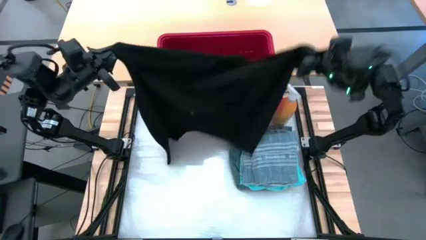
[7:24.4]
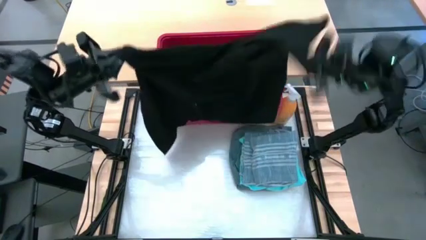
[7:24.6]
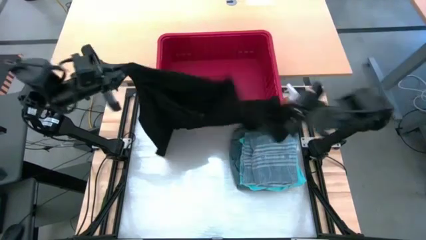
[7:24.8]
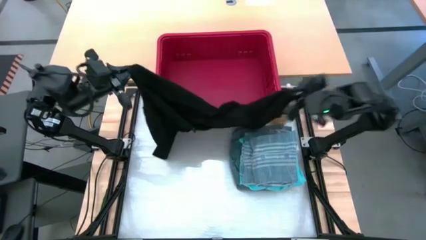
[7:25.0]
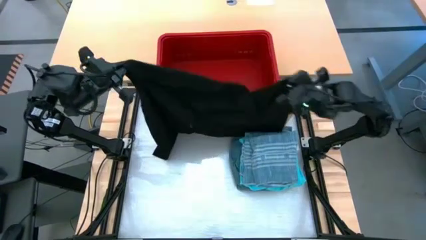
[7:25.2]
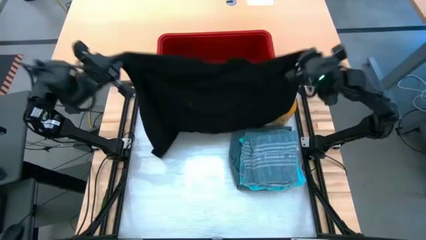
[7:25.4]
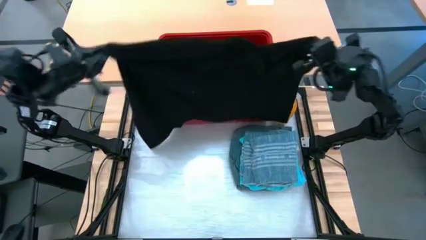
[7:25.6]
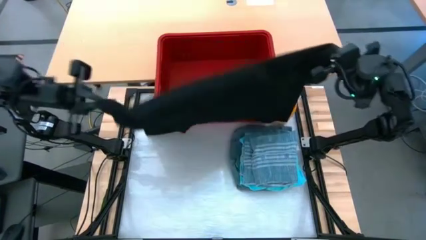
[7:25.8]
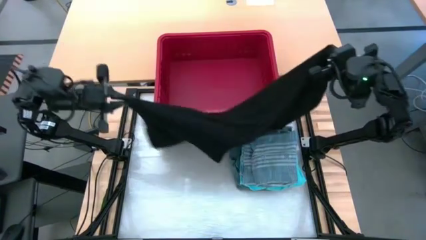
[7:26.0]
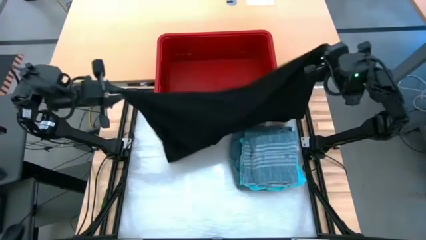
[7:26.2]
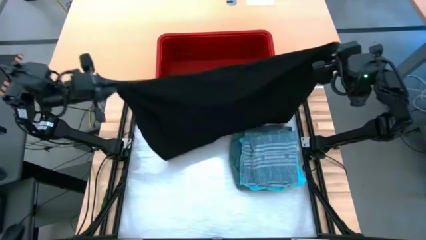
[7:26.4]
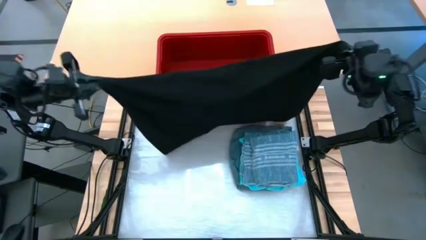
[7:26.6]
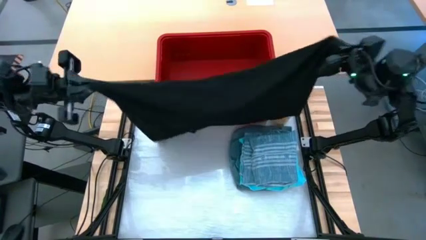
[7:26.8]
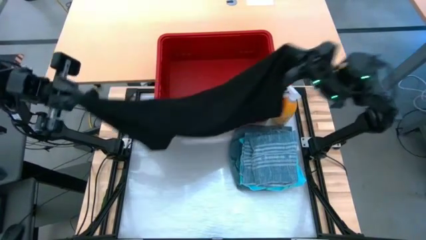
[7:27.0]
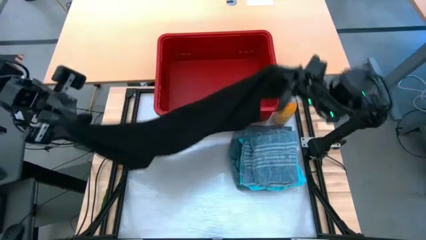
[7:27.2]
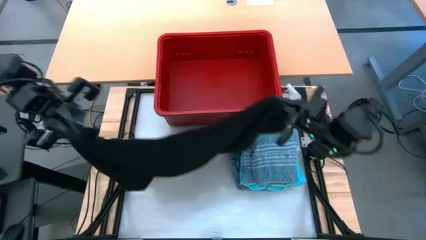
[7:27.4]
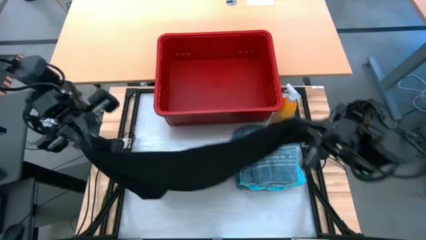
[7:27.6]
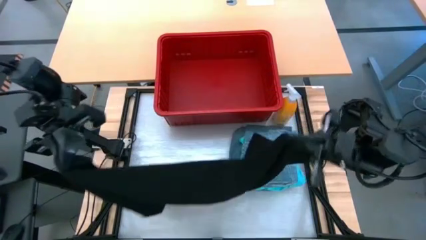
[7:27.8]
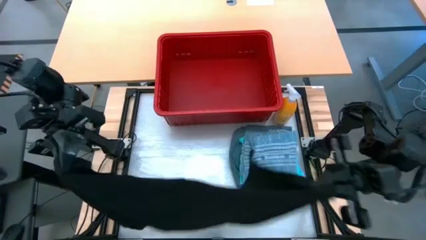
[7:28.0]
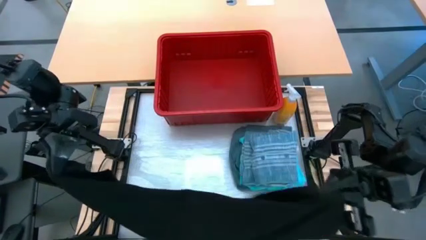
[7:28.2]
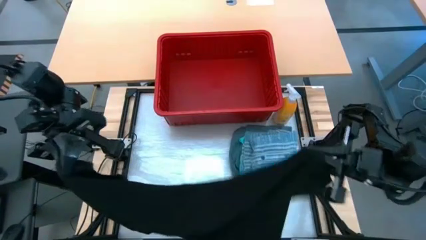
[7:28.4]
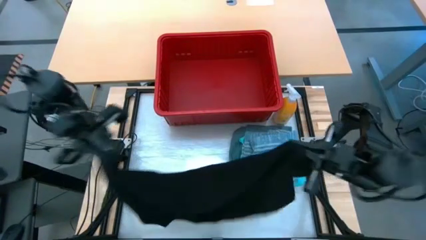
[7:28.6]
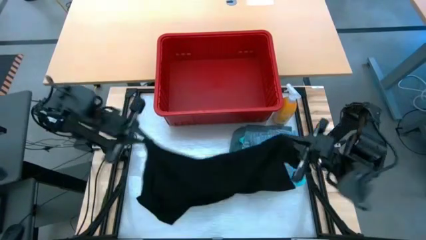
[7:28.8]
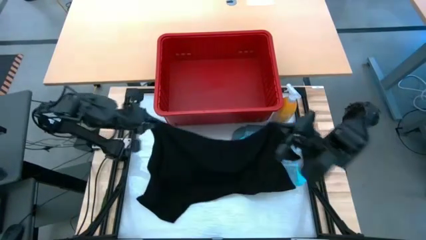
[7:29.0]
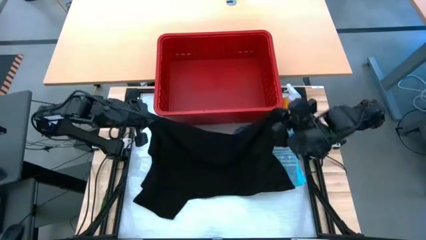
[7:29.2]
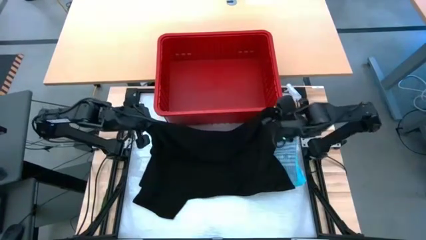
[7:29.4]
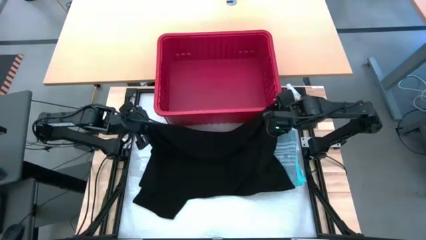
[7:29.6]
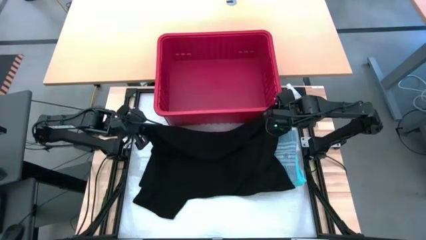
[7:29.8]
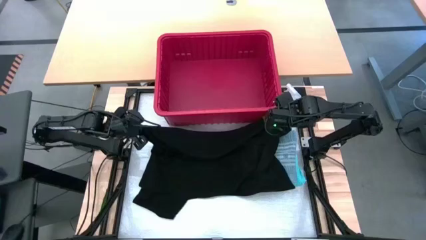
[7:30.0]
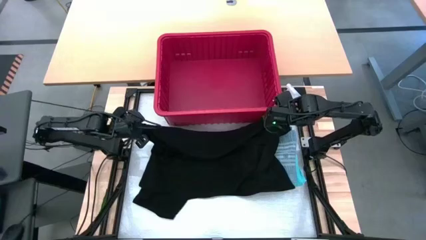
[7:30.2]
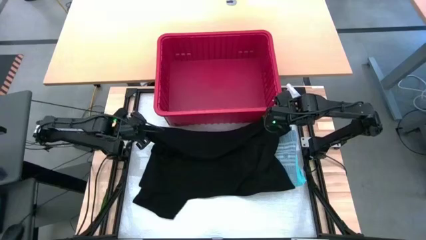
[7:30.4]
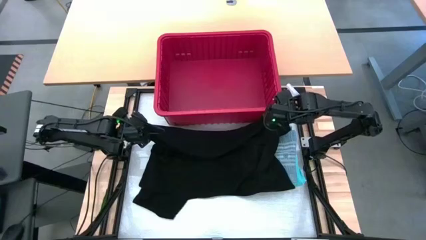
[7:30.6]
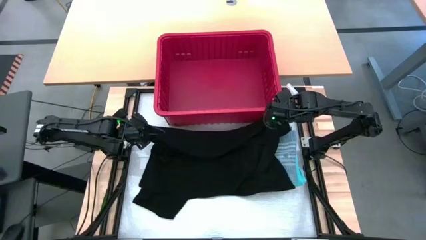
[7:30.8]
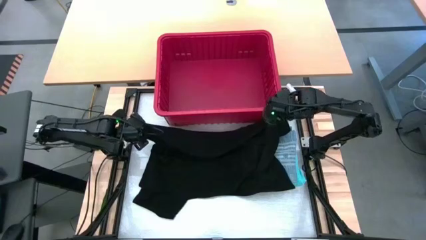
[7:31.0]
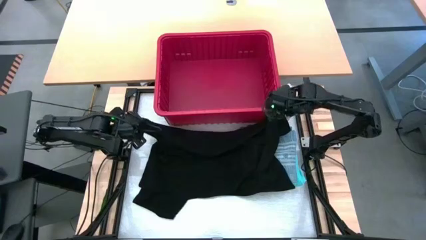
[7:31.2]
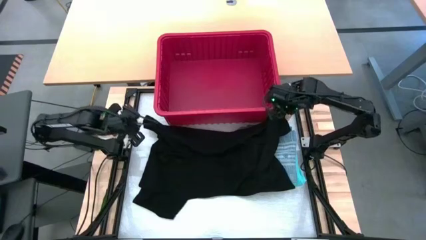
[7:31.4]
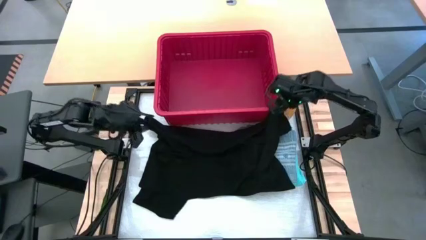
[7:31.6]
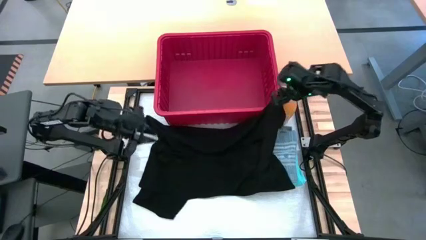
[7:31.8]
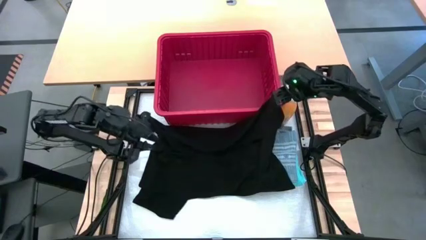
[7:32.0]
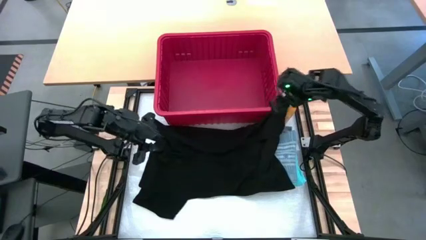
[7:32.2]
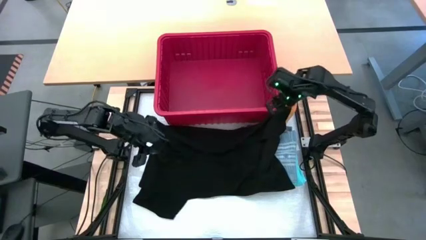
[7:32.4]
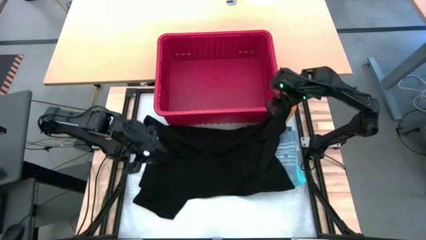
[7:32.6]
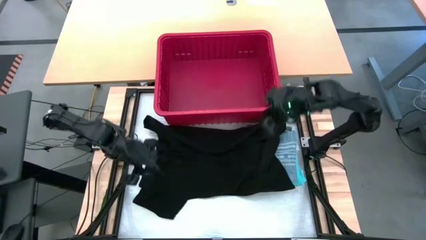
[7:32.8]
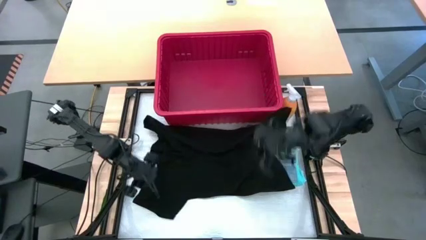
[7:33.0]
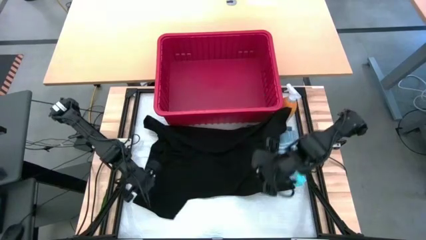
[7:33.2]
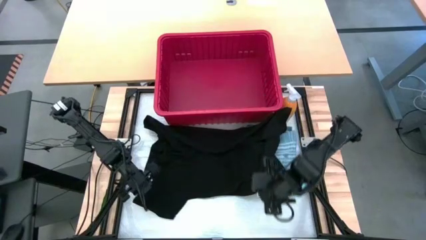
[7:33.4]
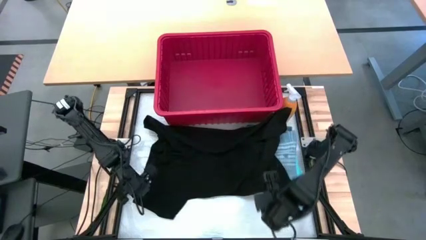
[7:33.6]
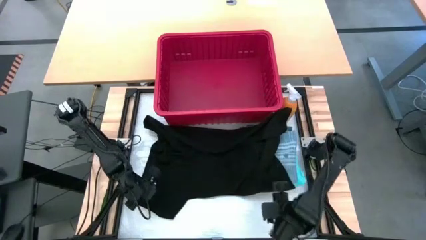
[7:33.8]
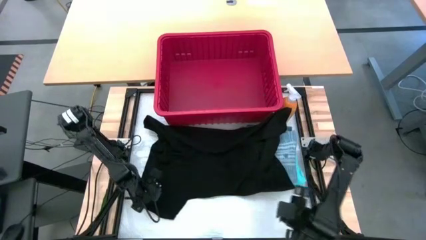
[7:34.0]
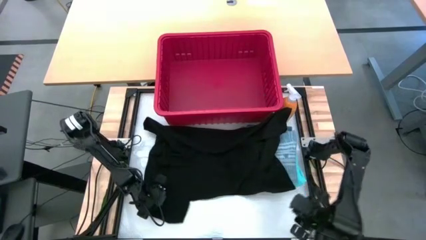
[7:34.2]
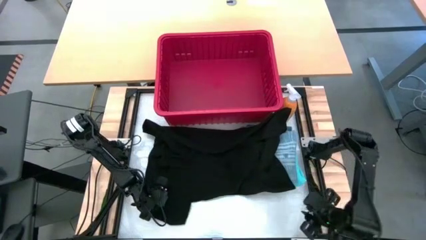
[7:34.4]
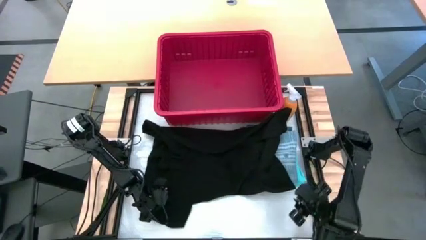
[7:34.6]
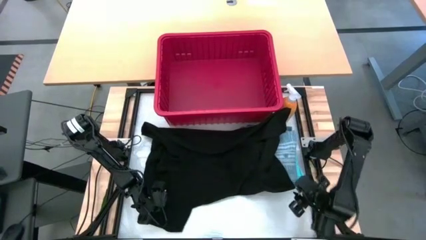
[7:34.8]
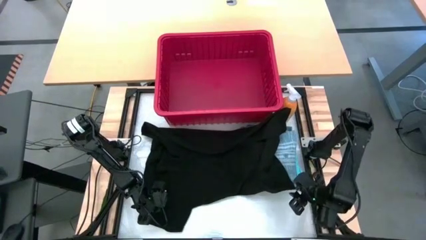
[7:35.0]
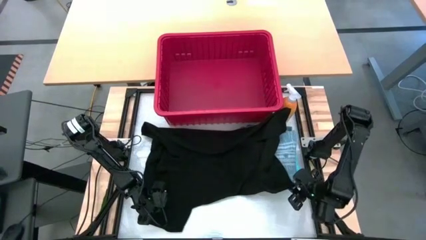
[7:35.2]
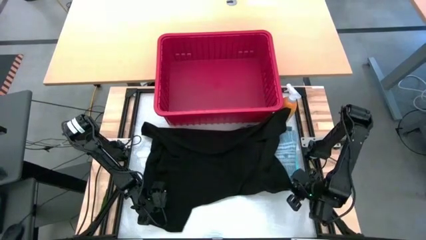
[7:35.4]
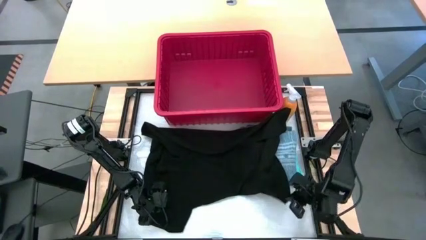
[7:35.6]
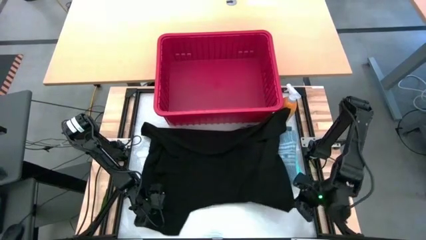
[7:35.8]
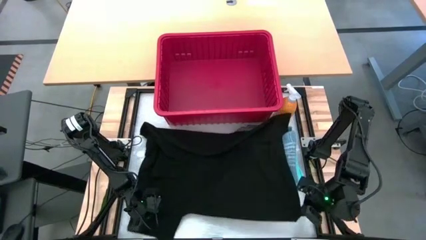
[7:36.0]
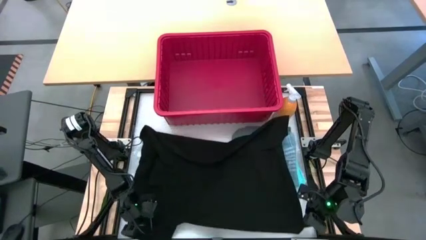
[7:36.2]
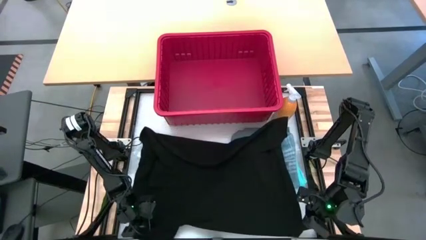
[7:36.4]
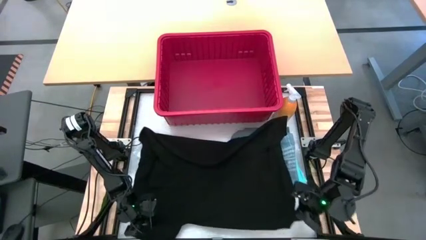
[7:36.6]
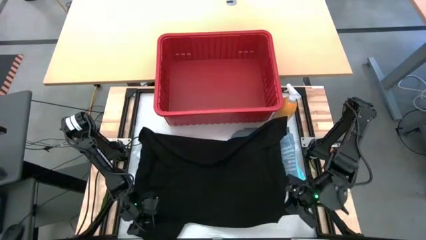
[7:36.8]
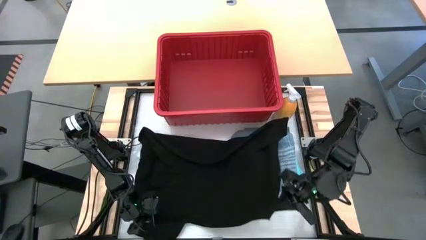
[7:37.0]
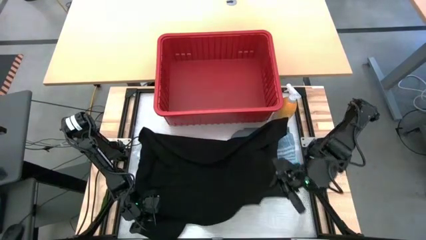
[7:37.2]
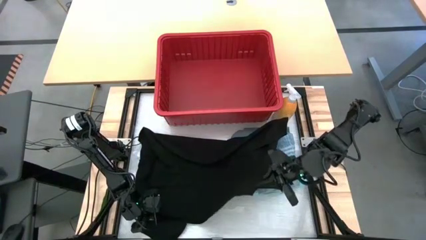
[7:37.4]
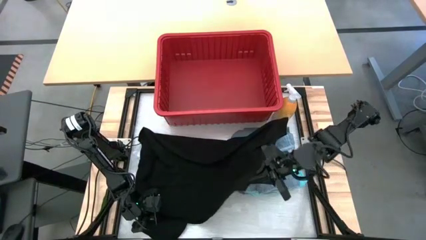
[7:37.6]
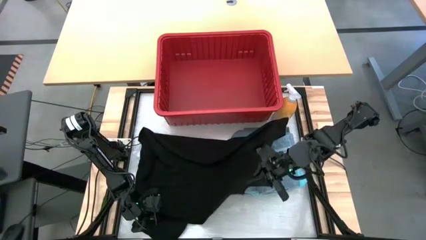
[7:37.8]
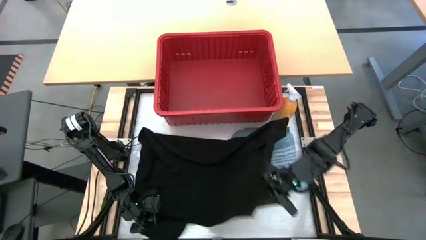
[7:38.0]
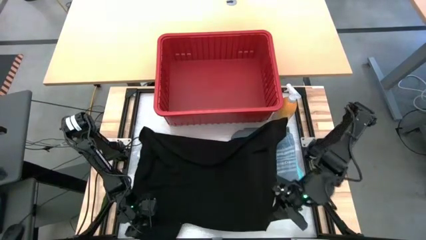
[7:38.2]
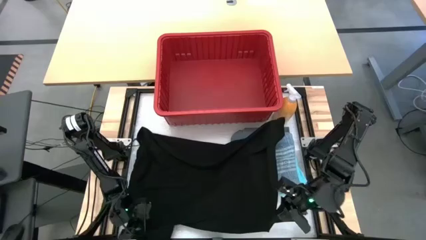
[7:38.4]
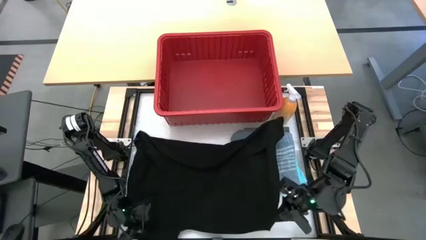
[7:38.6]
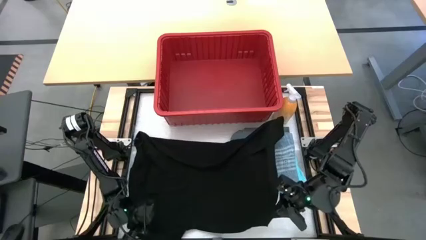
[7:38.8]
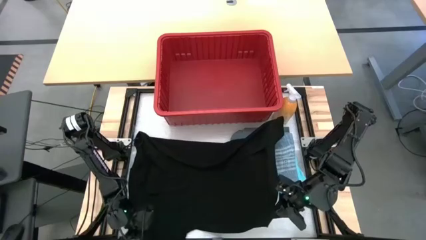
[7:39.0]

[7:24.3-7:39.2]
Task: Fold Laundry from Bin
Fold the black shirt
